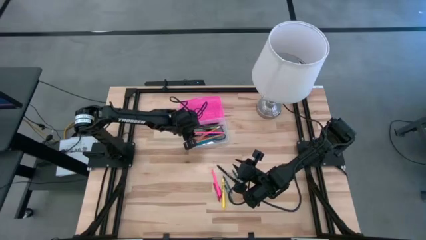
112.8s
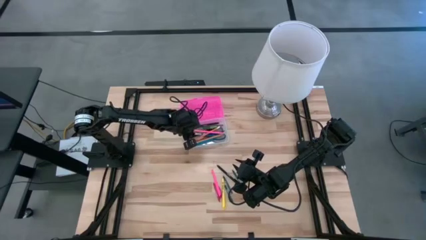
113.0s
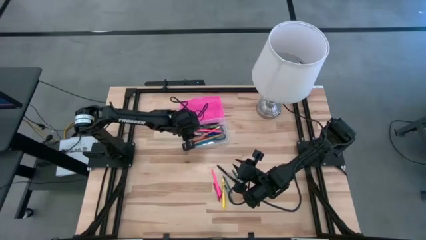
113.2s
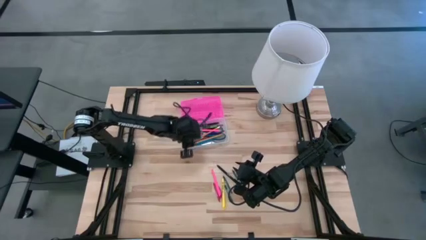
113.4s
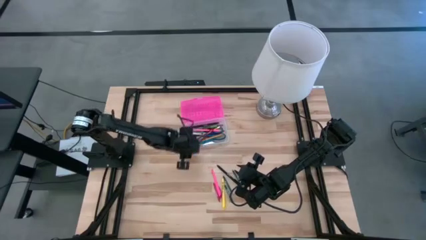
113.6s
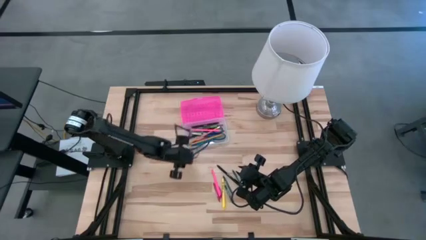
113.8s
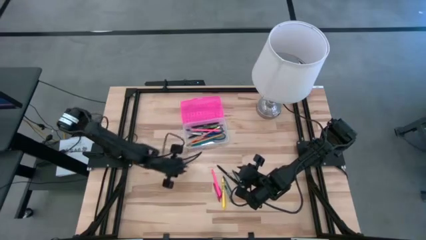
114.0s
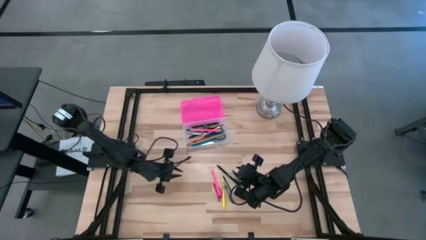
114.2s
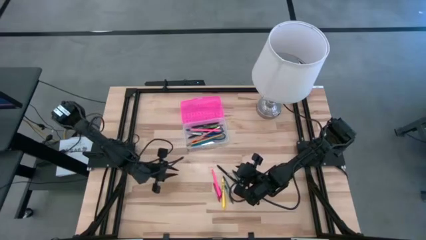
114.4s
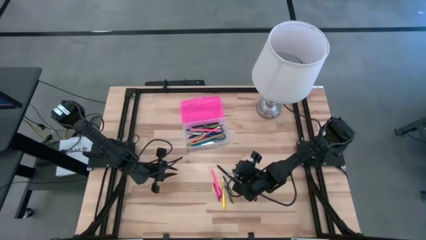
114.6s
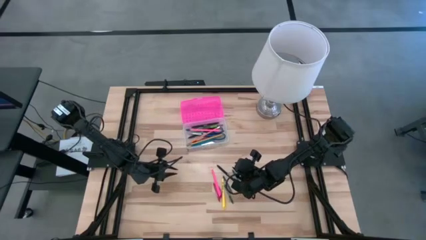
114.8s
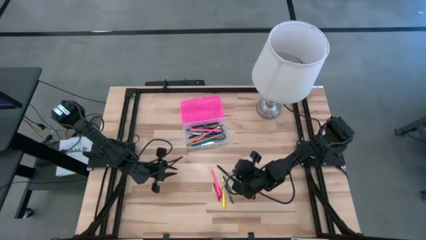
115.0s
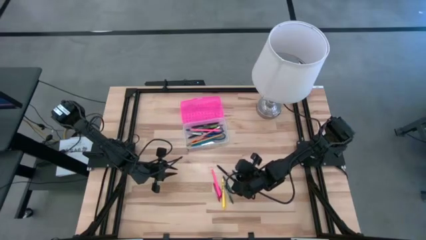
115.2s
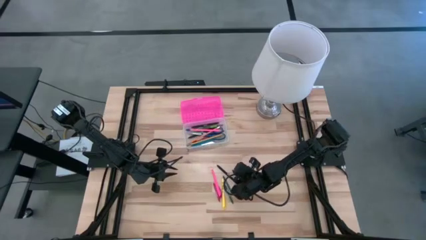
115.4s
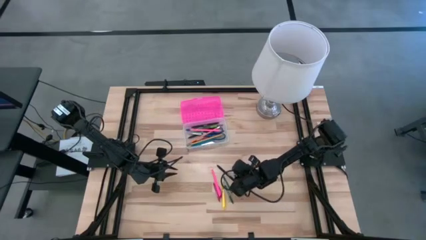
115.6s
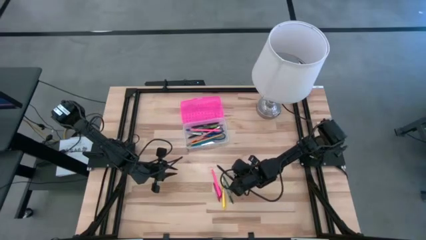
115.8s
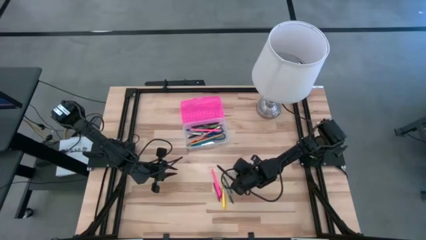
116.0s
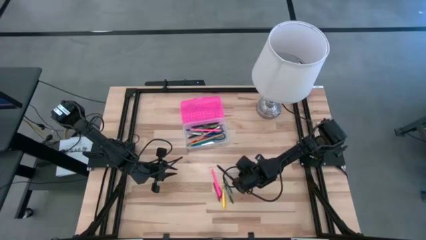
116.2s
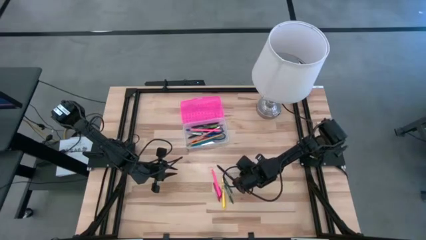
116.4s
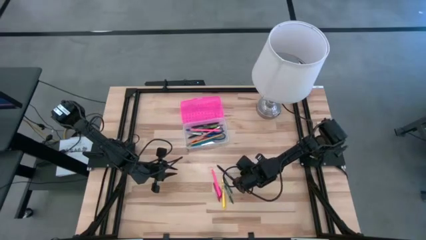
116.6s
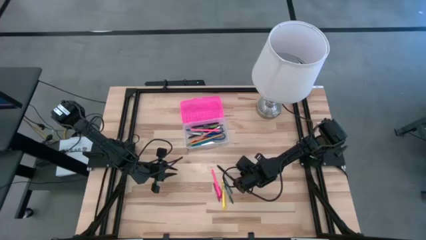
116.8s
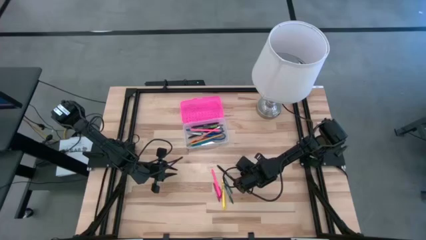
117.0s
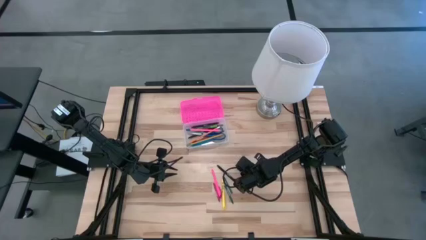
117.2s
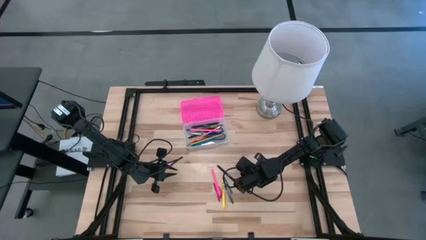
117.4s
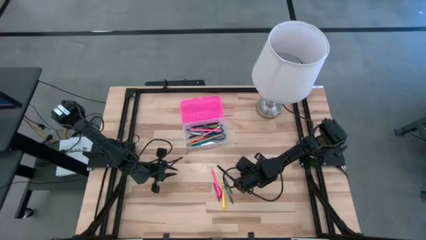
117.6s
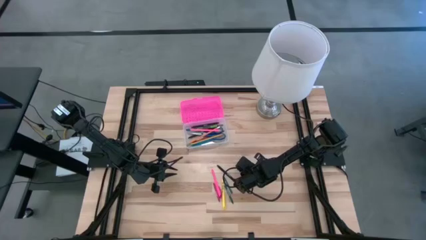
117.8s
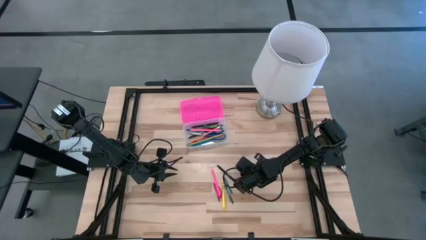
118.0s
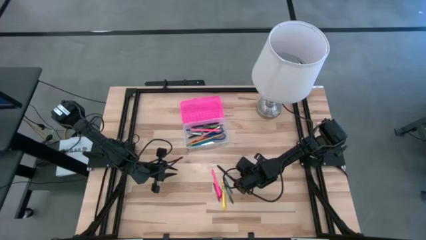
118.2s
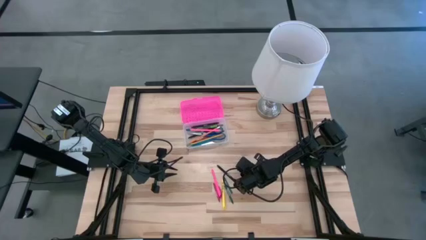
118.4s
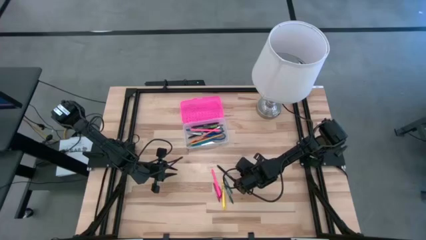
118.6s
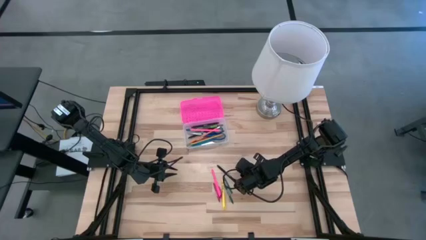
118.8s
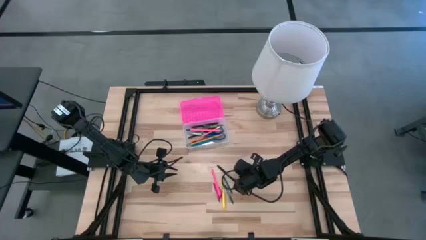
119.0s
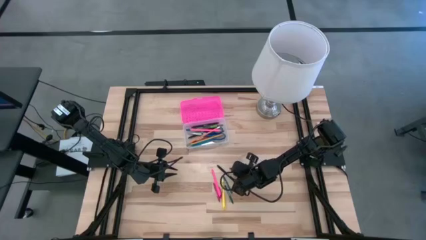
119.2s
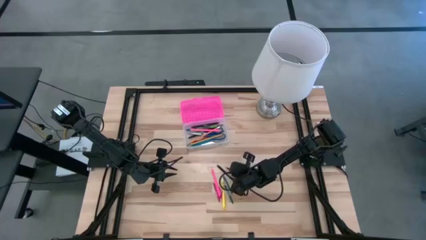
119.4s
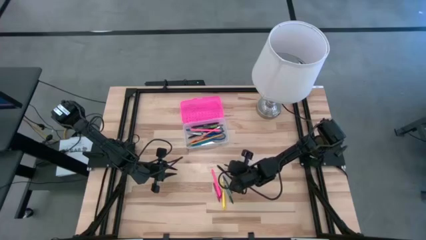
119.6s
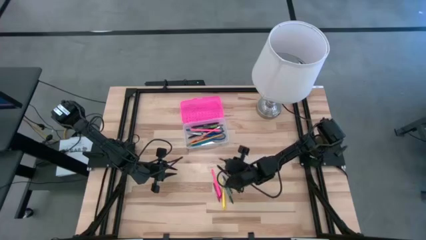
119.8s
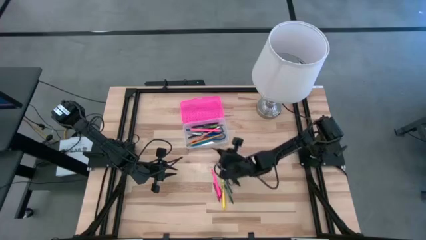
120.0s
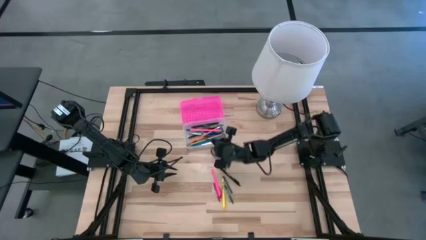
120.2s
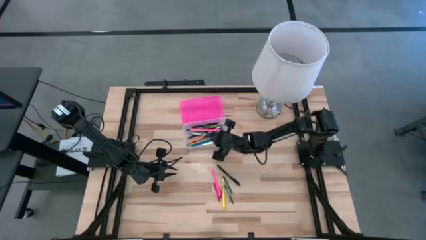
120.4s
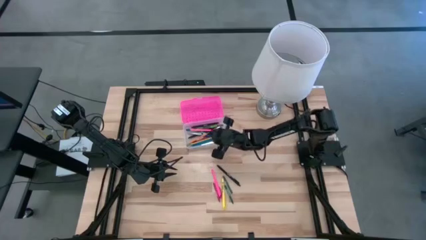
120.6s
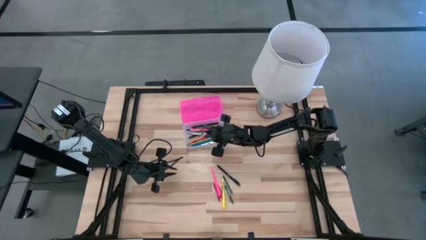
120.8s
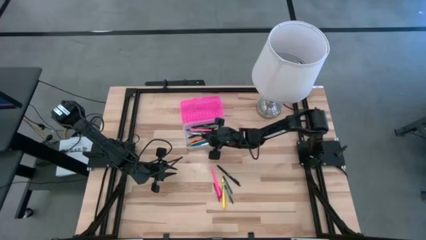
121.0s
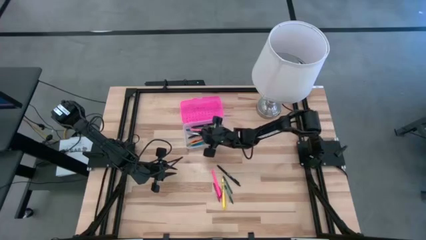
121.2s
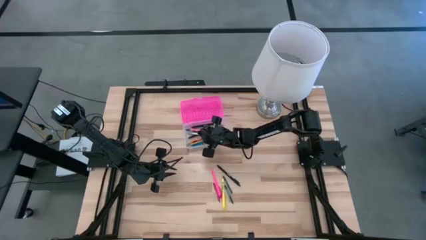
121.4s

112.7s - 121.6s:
Task: Pick & place school supplies into a supply box
Put the green crayon into the pink supply box

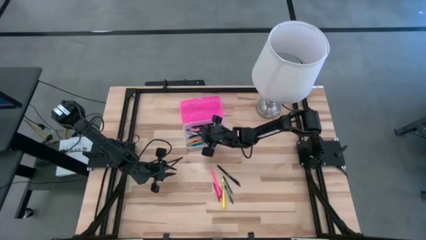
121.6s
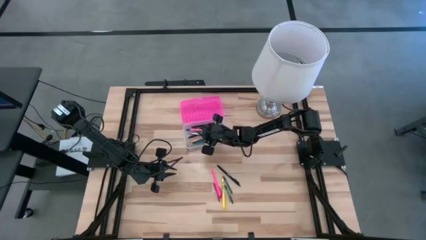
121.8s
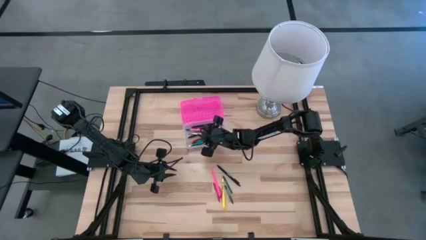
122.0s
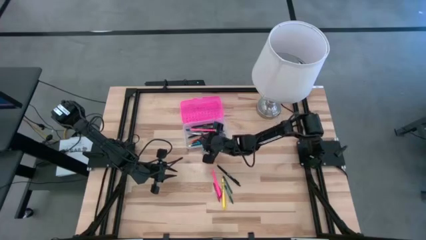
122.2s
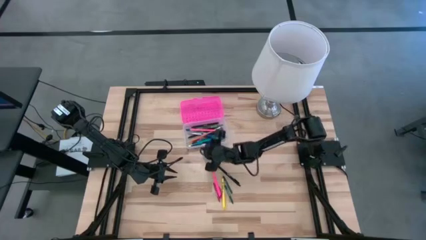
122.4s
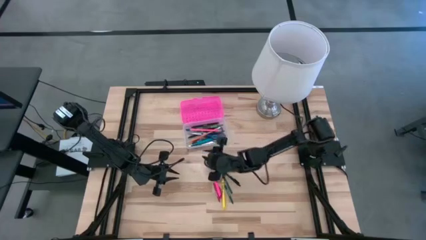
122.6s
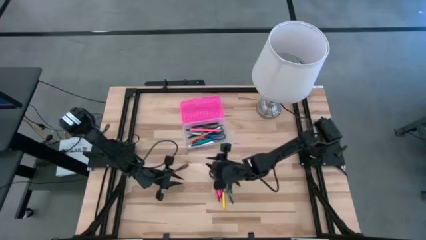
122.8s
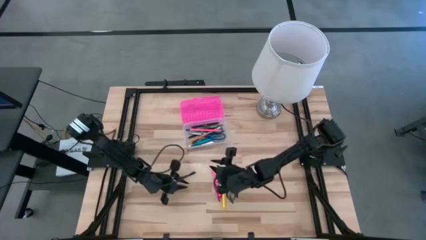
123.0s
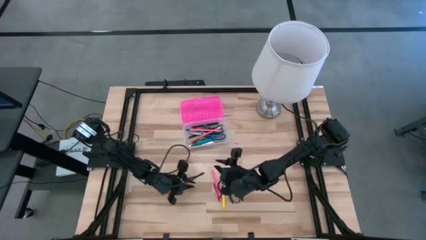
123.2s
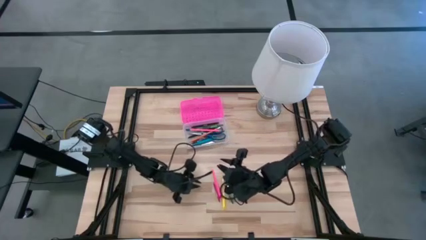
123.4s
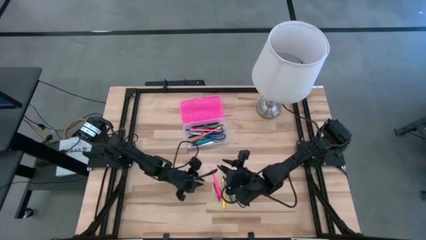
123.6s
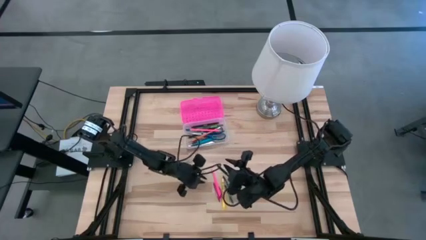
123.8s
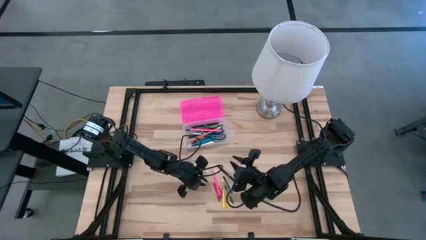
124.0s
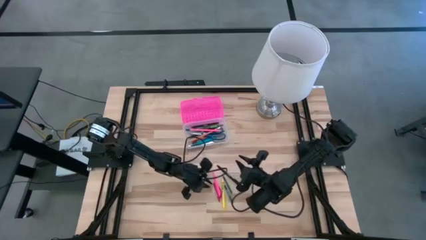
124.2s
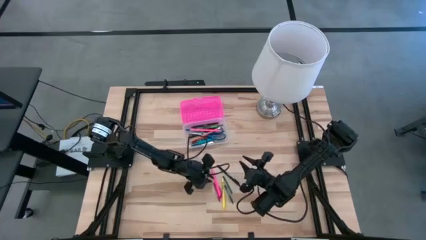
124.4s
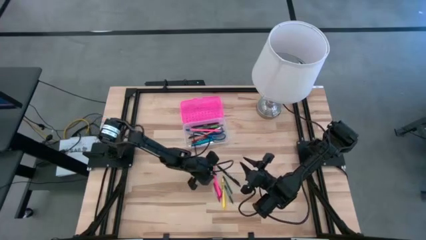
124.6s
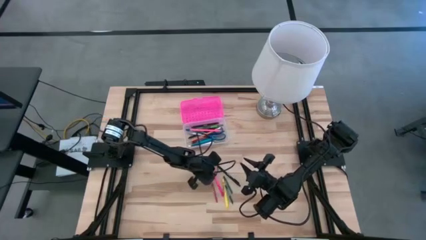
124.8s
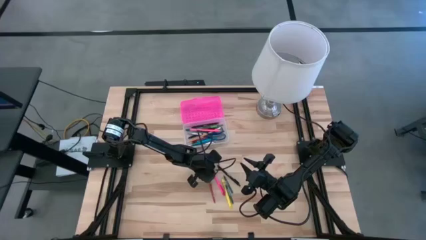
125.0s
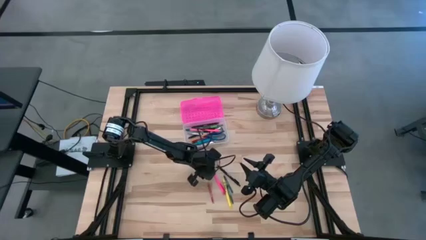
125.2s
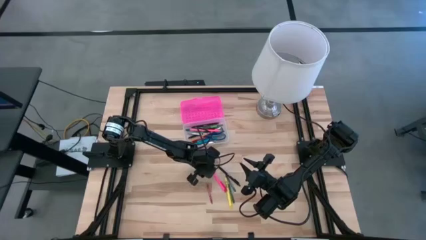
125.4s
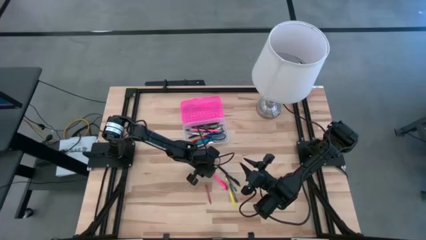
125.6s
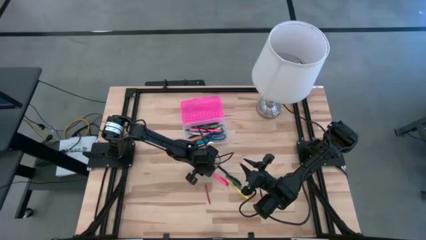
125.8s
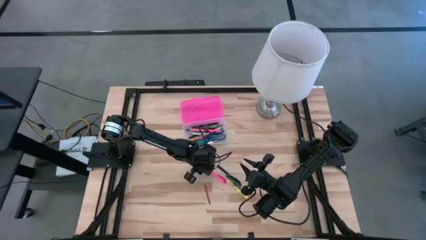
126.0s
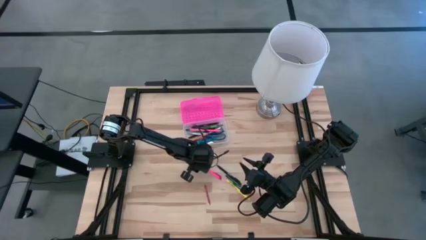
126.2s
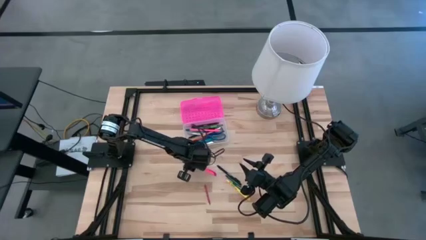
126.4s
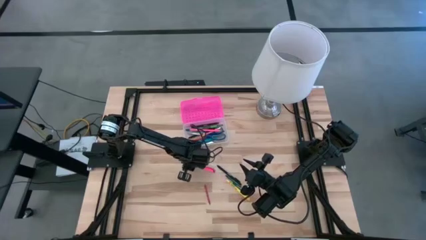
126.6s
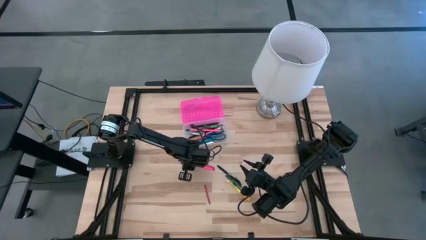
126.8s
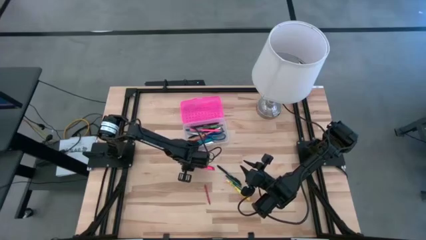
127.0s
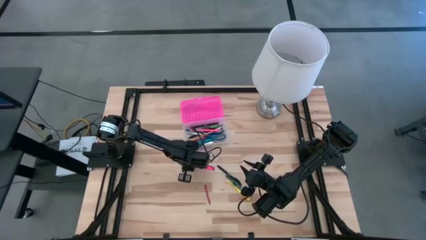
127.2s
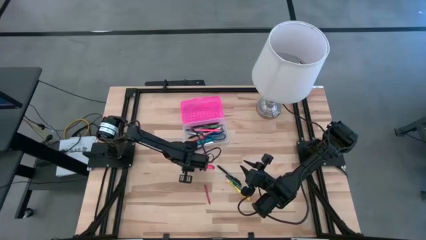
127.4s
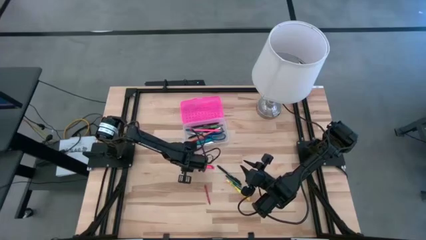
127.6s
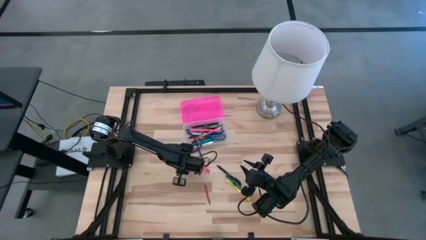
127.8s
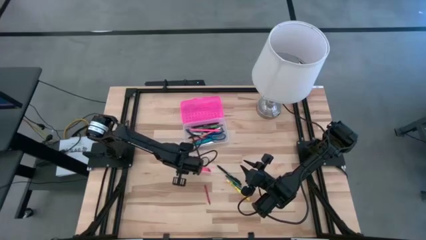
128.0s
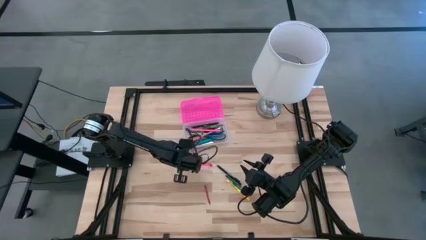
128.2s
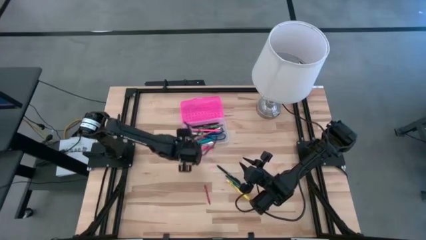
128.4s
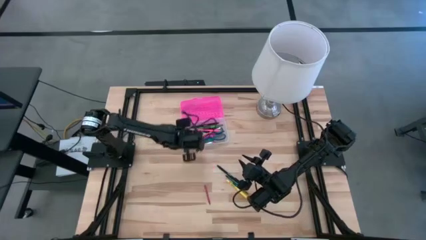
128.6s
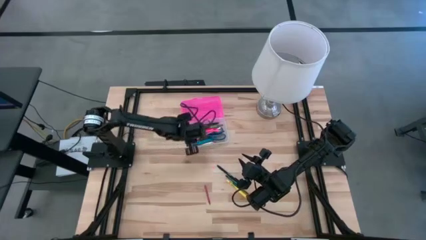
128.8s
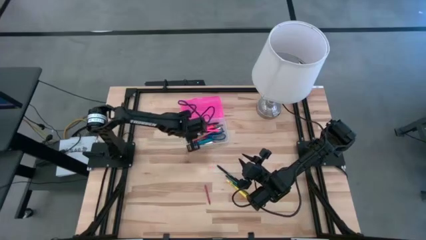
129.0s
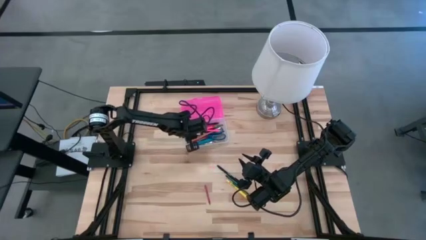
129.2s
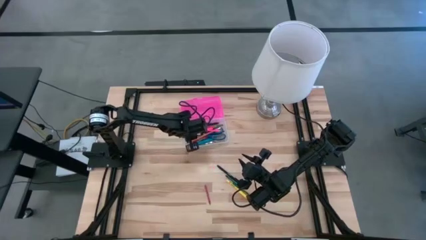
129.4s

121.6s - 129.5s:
Put the pink pen into the pink supply box
